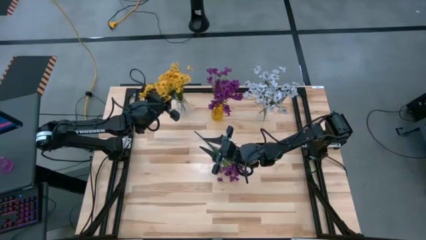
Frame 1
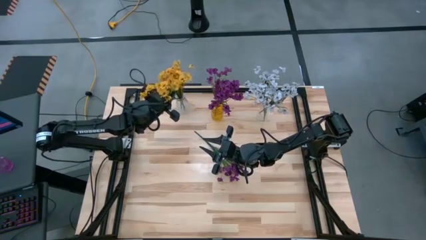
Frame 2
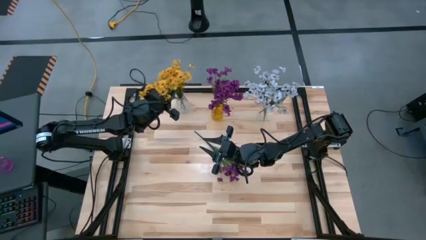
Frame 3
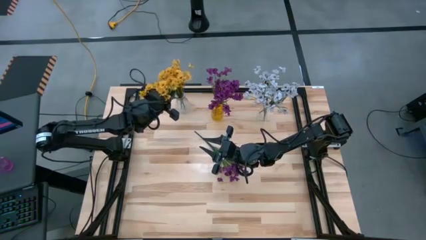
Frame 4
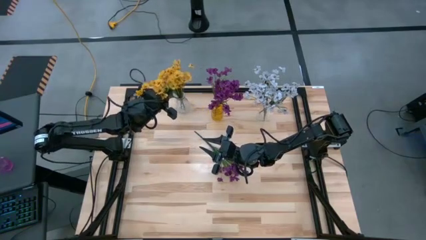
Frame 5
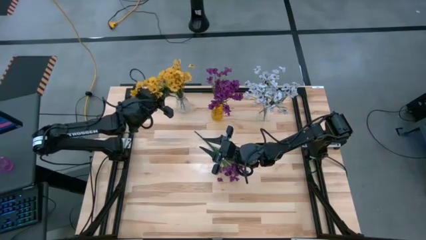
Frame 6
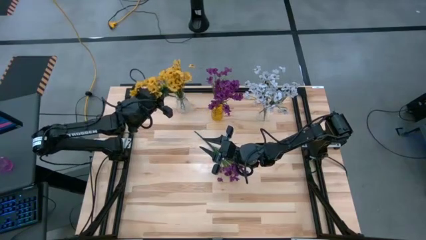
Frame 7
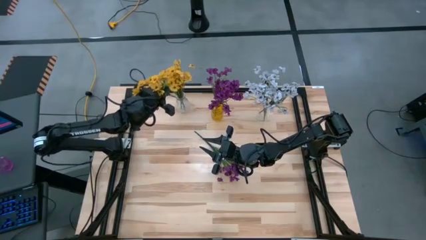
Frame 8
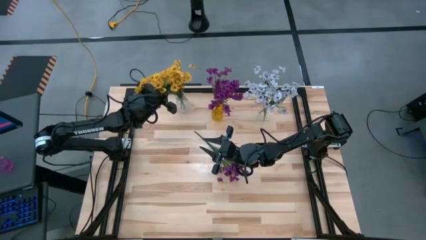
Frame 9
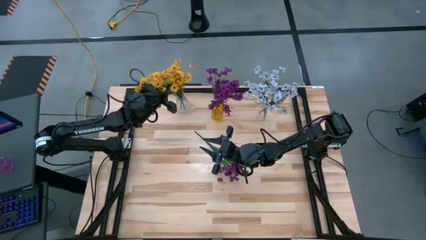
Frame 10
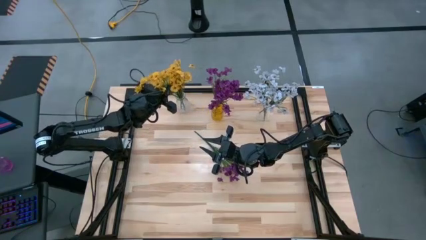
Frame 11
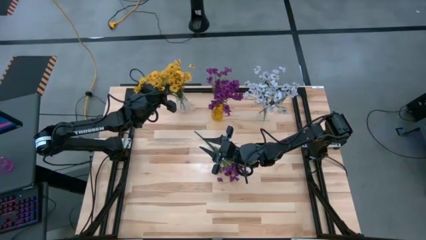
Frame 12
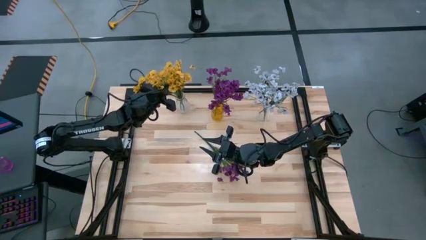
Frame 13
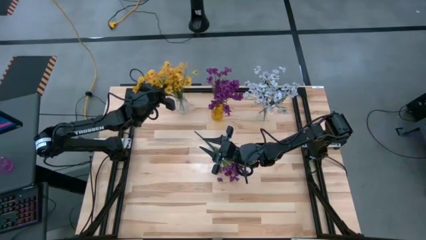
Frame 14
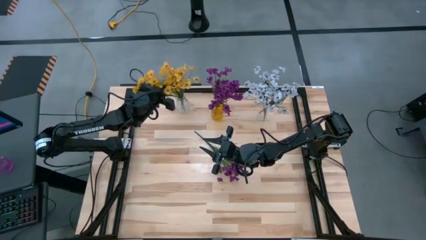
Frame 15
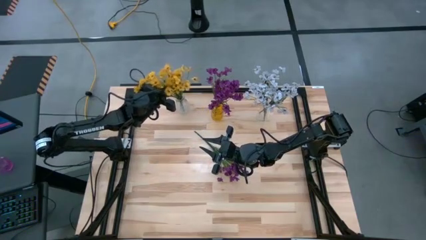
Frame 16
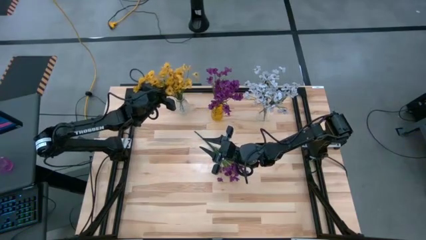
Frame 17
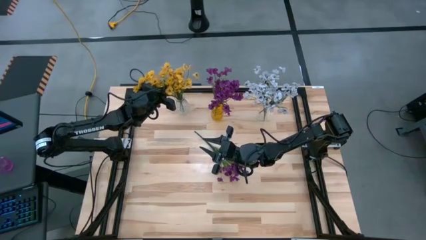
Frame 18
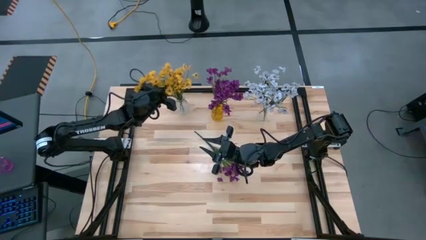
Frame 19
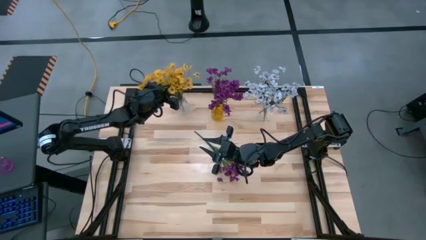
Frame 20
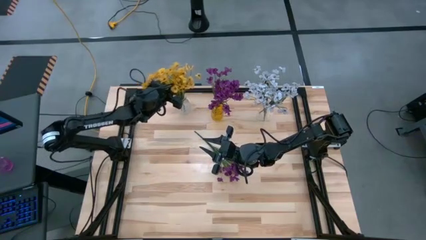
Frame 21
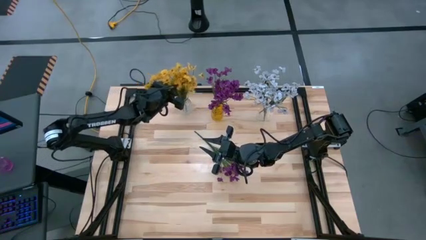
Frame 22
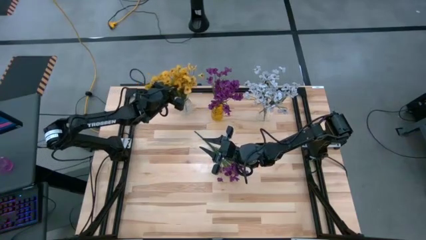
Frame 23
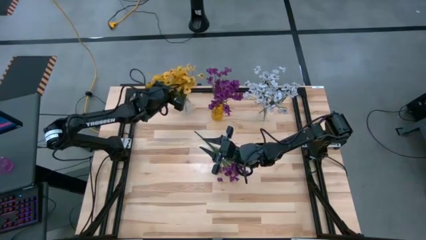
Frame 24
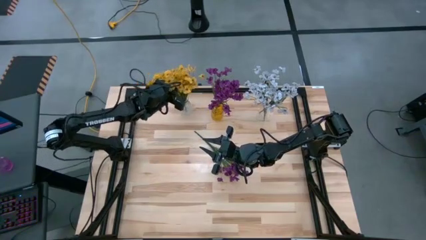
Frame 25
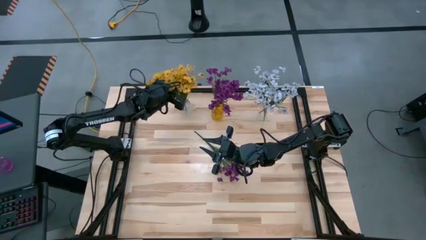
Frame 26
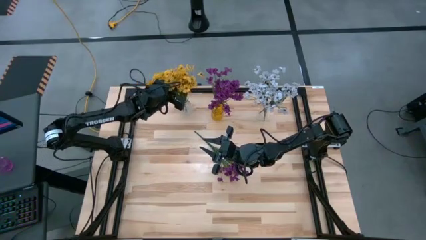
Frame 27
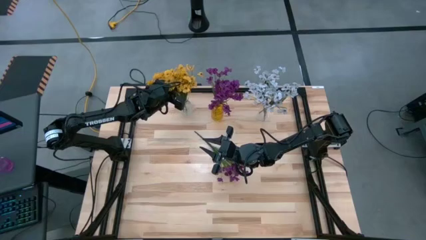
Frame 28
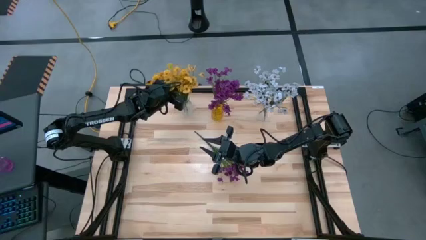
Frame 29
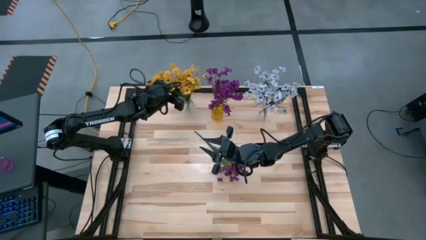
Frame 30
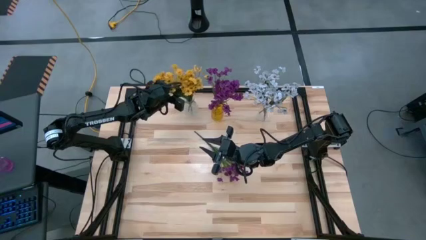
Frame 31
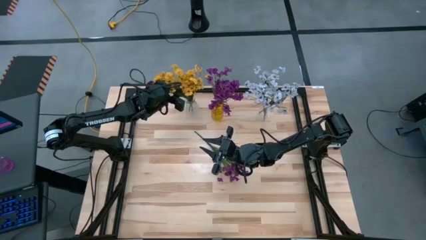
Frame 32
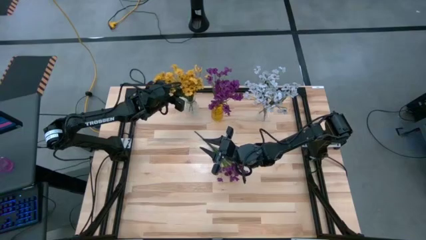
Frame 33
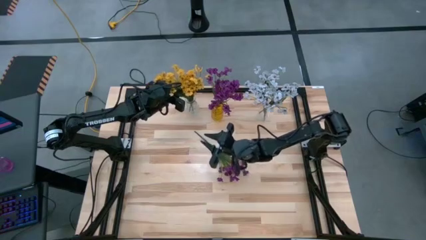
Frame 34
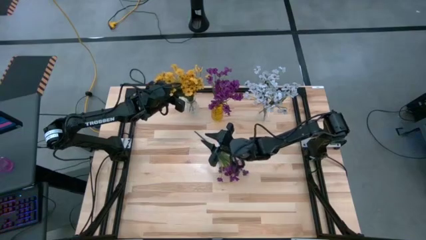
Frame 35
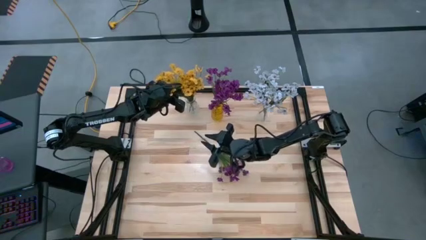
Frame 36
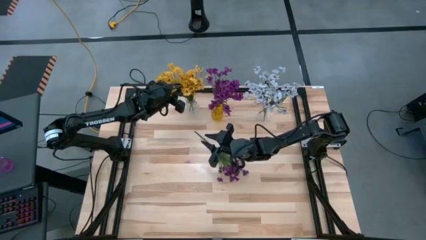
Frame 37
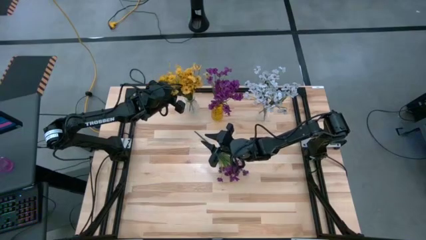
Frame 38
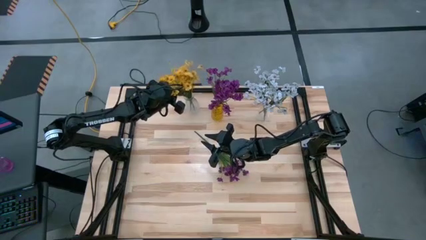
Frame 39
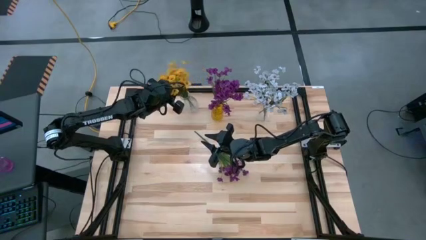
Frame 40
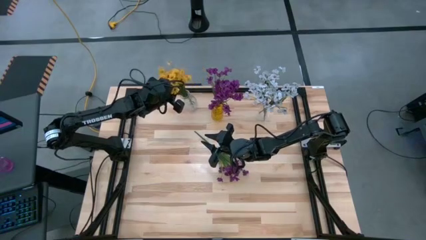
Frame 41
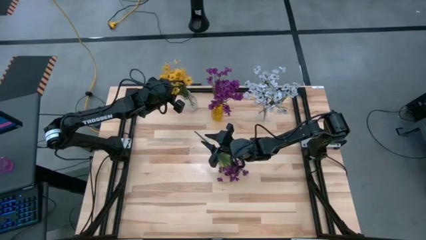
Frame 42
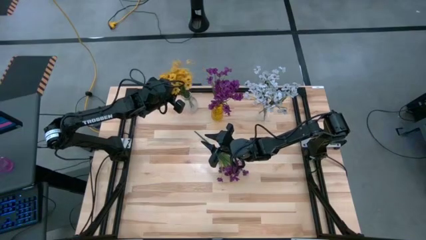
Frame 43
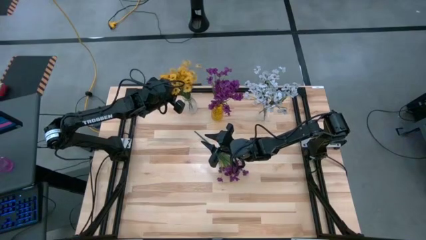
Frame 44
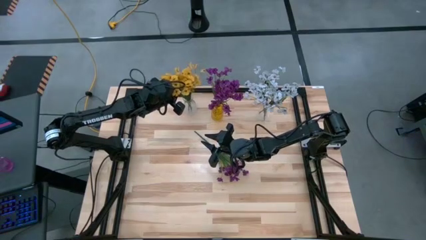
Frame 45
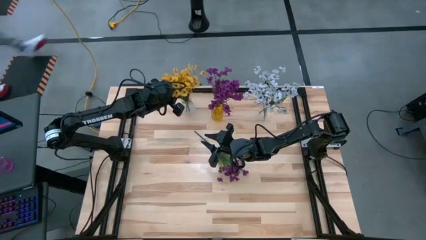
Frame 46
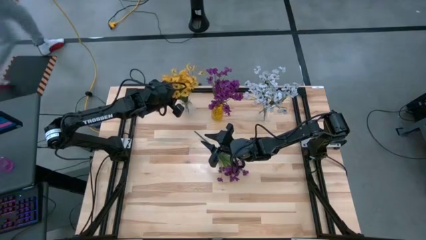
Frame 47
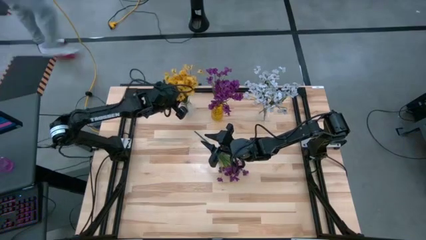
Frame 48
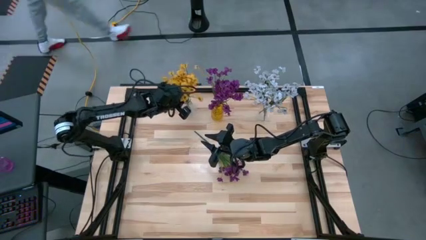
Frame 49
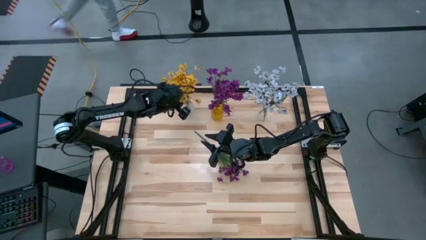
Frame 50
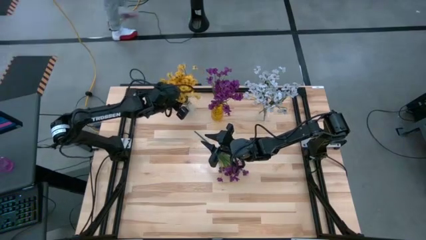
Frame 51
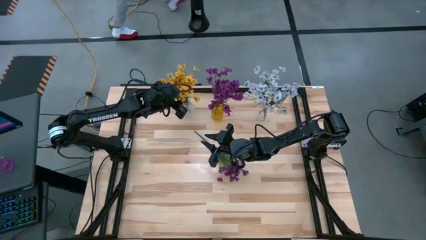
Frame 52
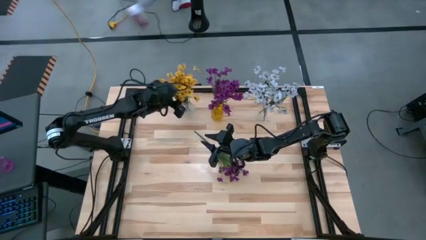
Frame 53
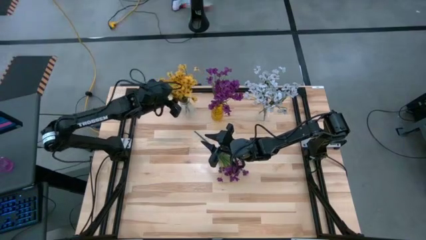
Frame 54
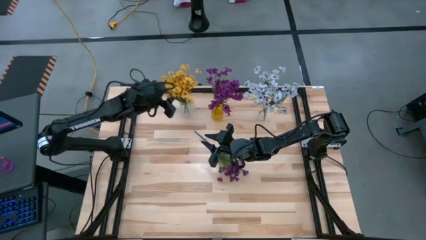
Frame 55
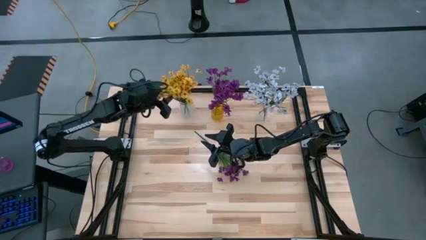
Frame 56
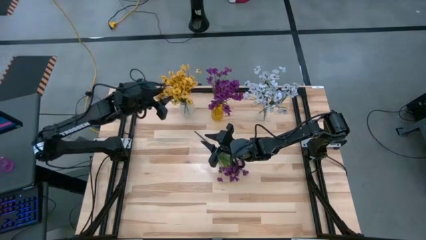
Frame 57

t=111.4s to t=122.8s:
Task: Sort flowers into vase by color
Put the yellow flowers into the left transparent vase
